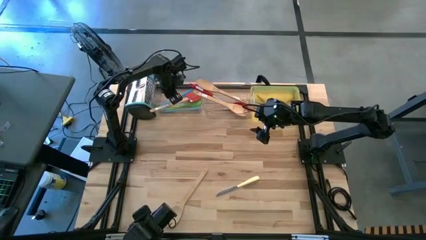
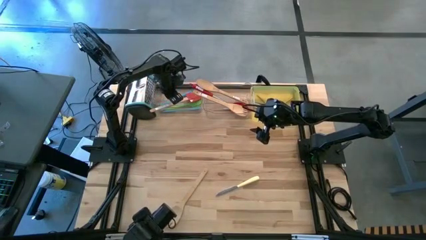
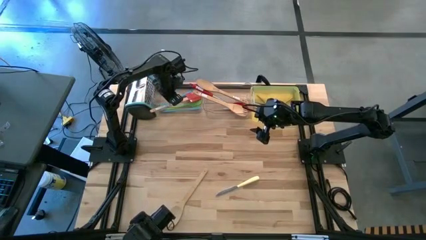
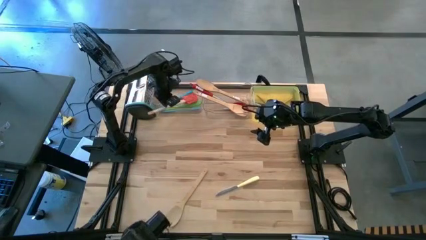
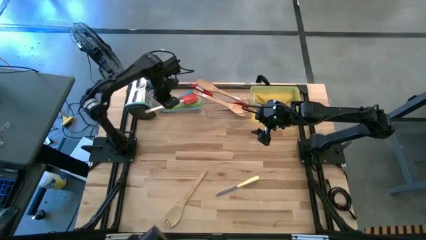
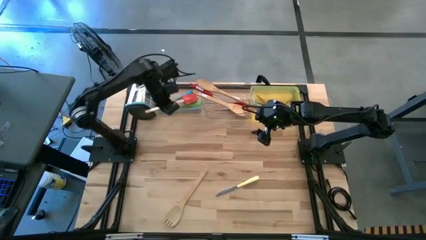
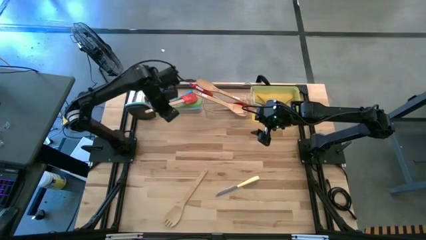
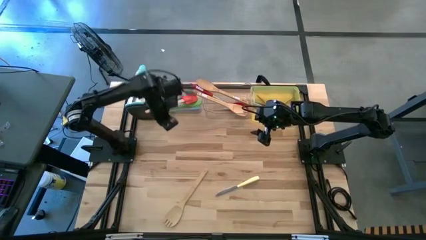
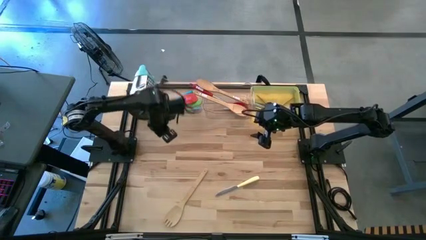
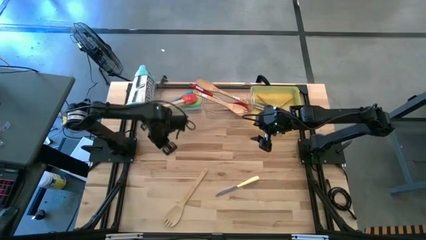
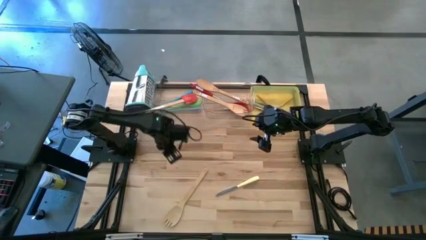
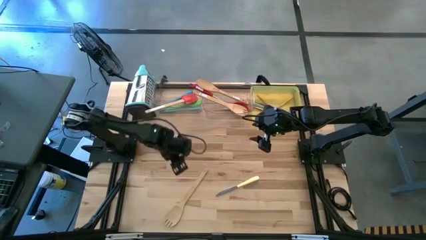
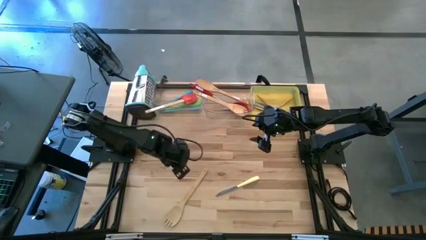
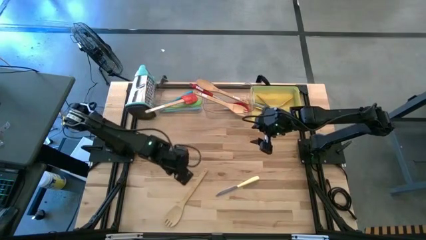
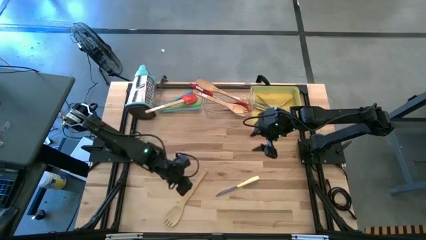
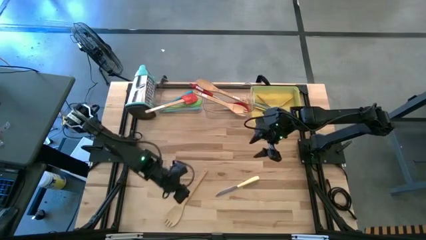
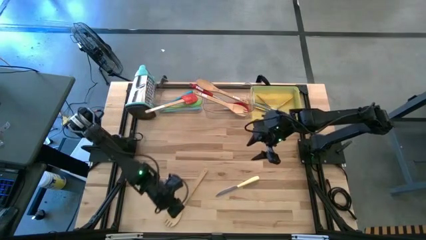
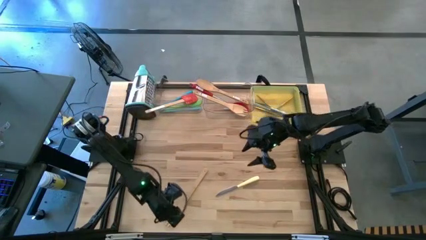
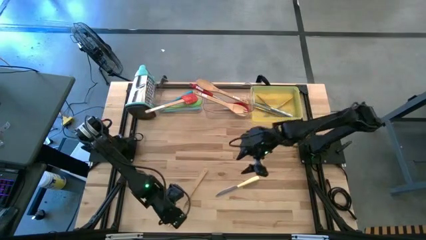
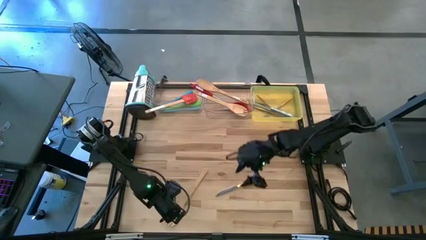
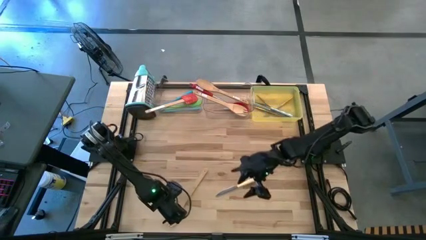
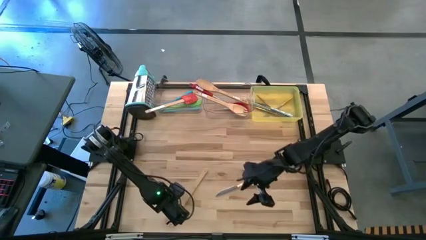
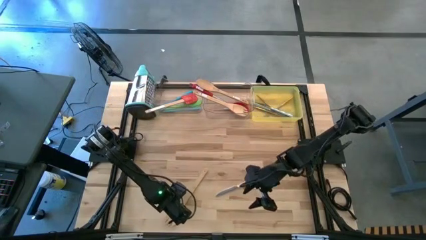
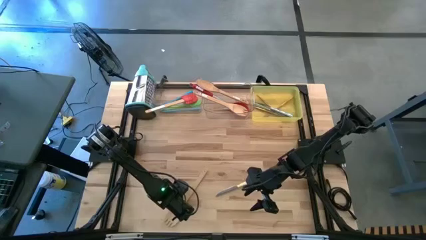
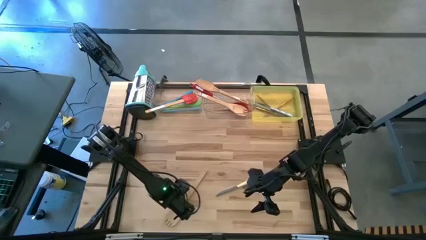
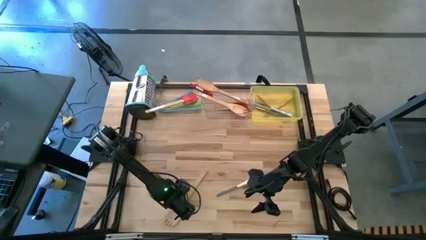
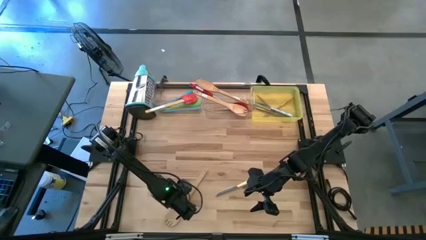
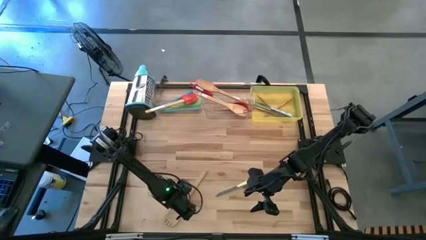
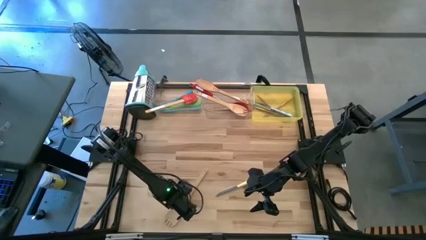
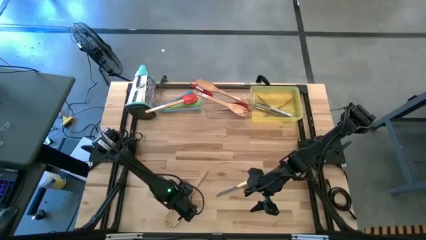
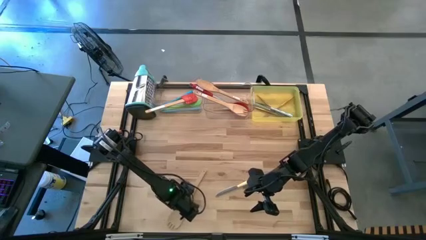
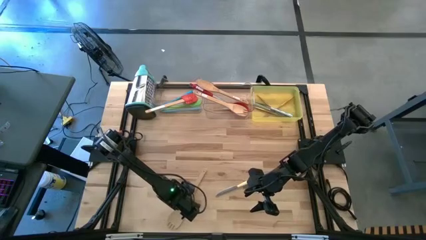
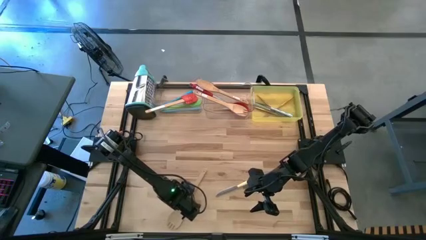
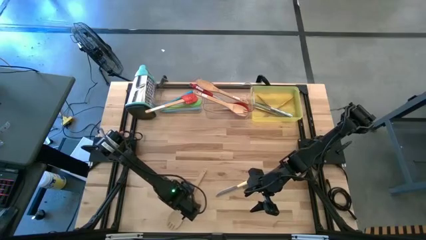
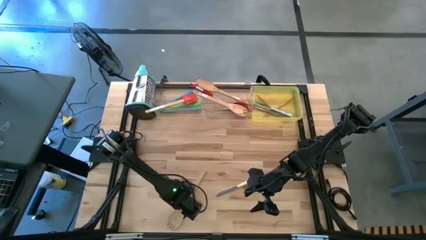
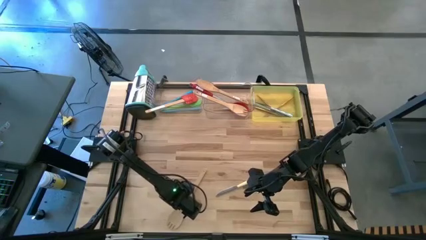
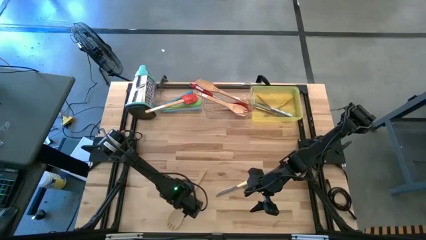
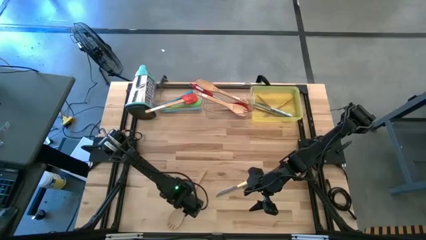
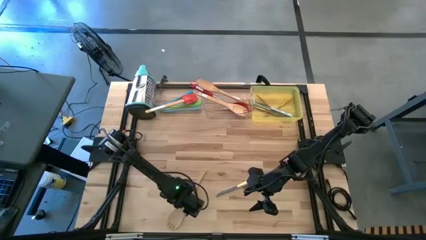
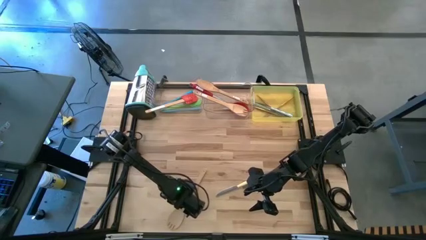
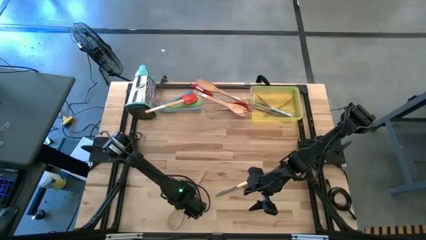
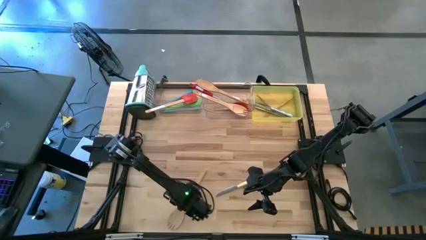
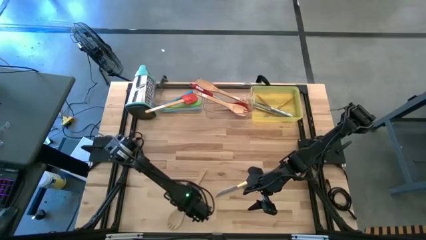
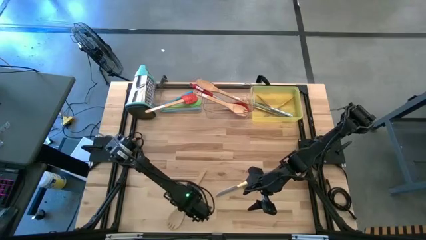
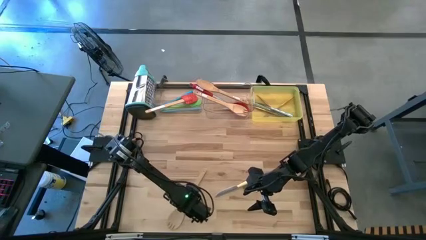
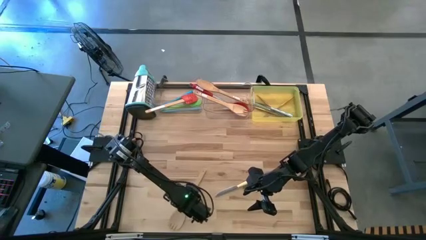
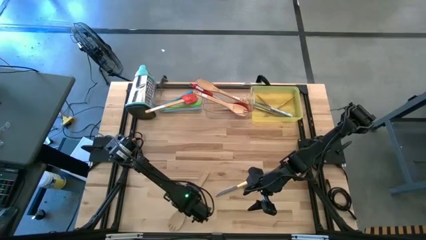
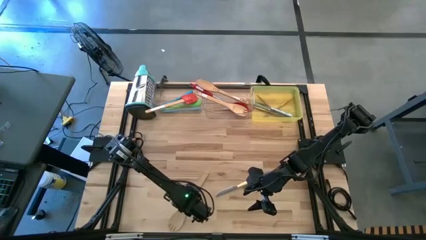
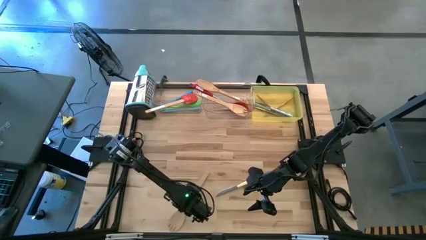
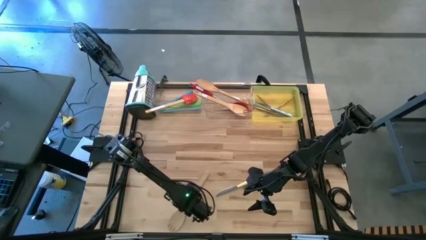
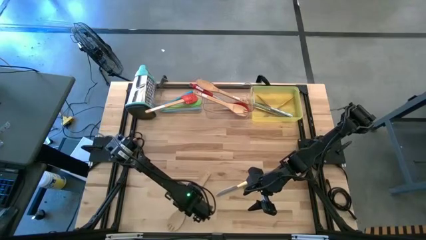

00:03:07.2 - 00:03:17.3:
Task: Pick & Place Kitchen Items
Put the brown serving spork into the right transparent bin

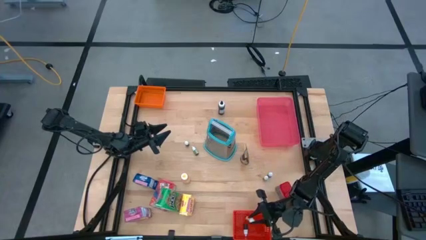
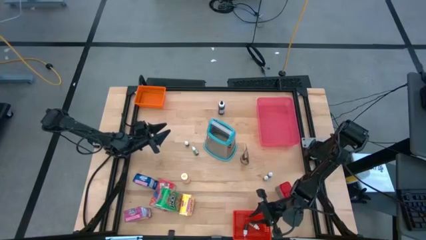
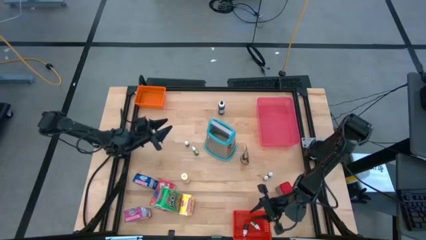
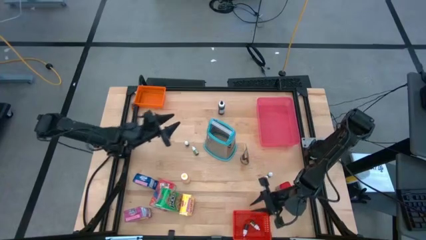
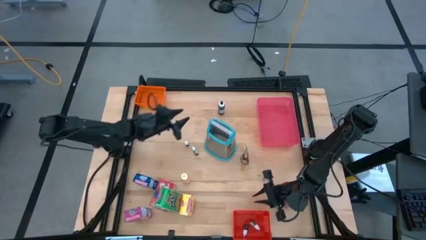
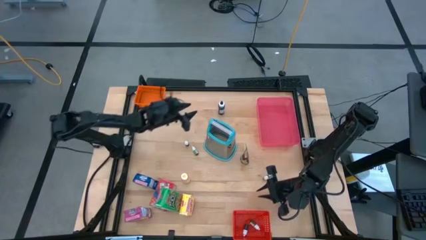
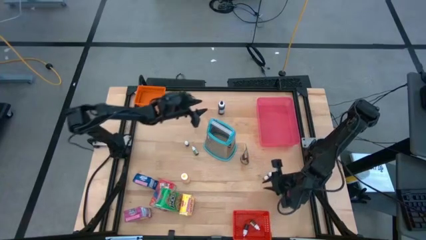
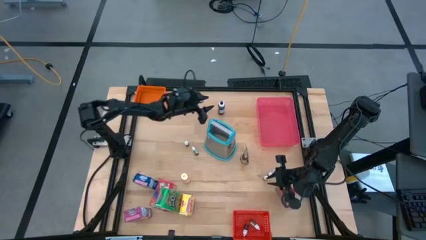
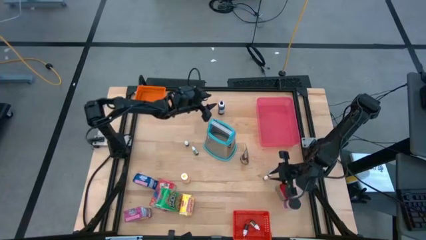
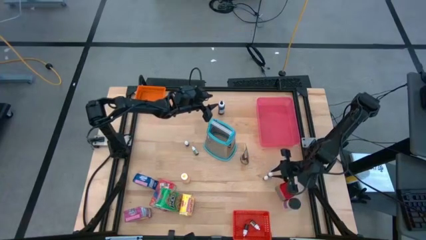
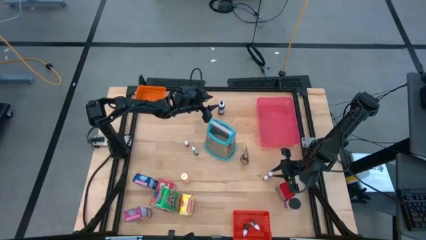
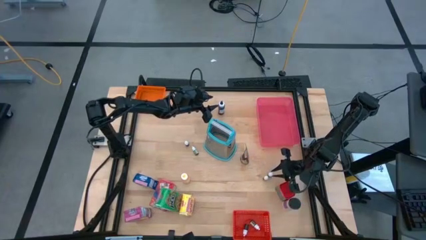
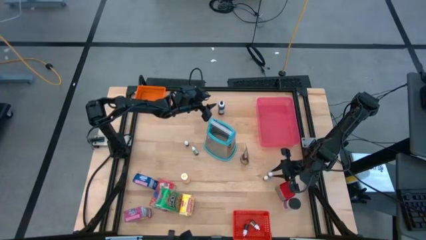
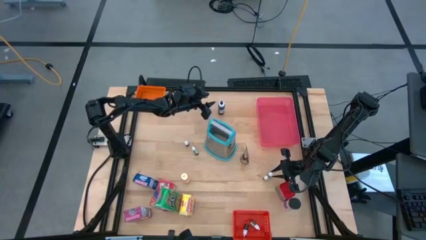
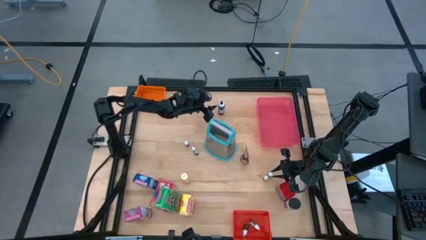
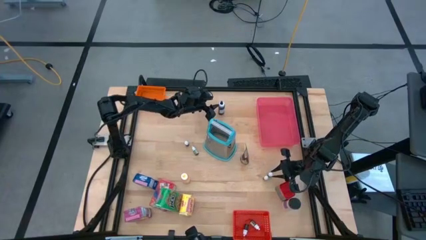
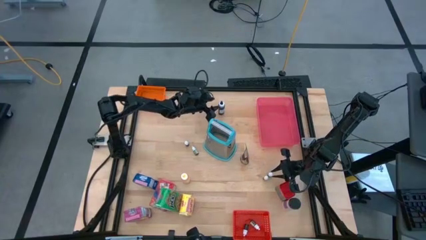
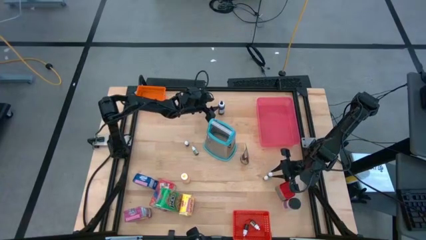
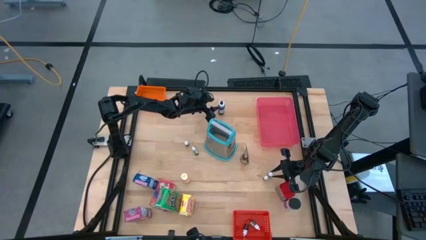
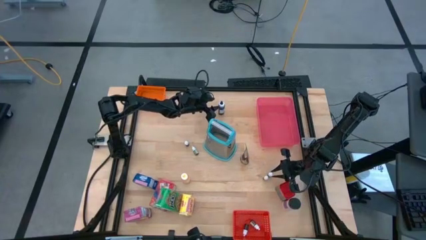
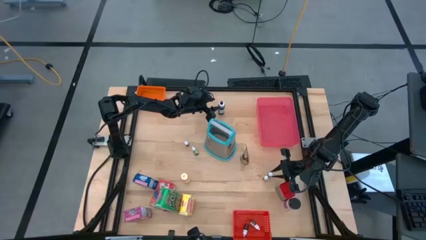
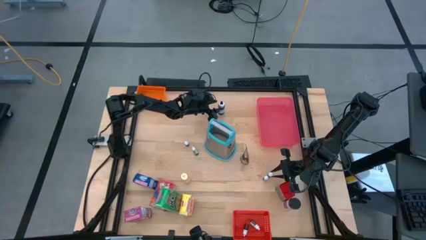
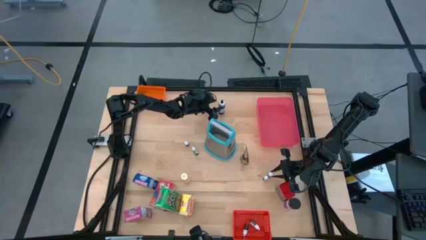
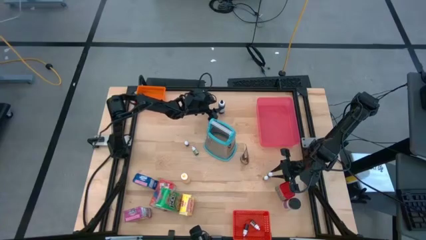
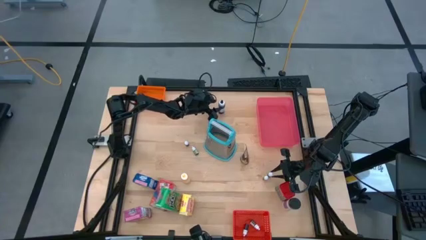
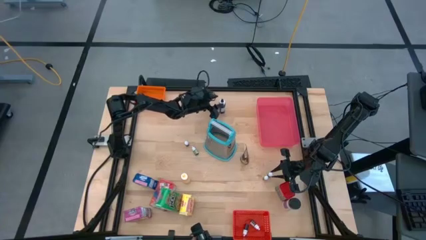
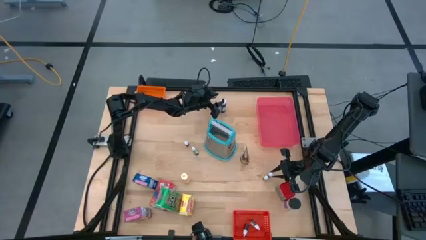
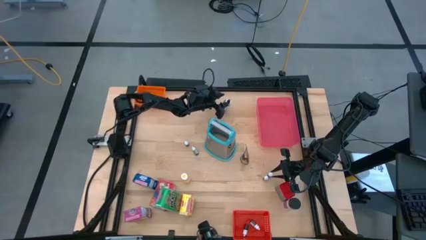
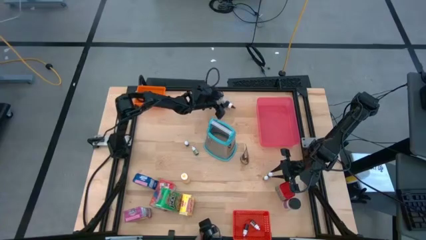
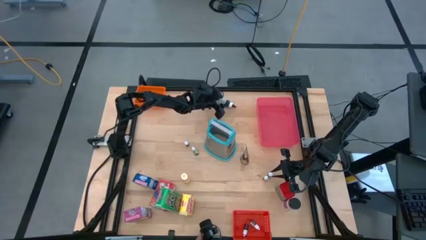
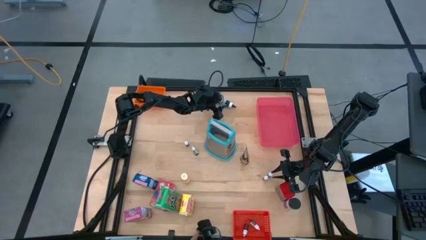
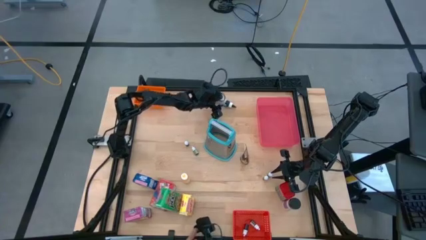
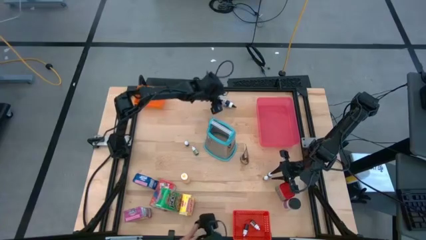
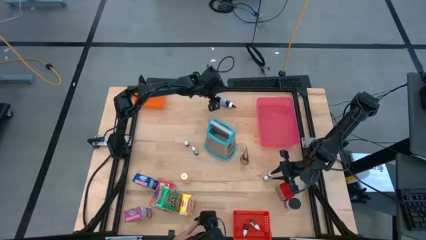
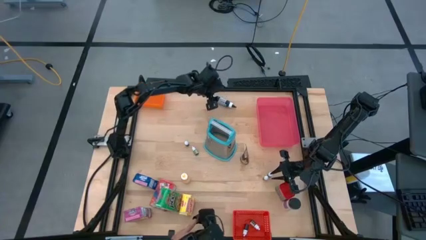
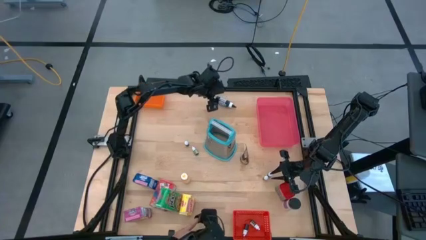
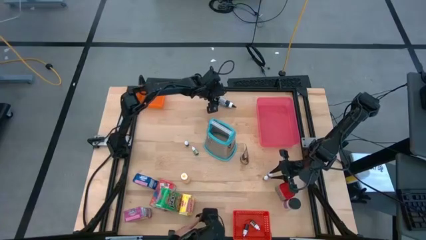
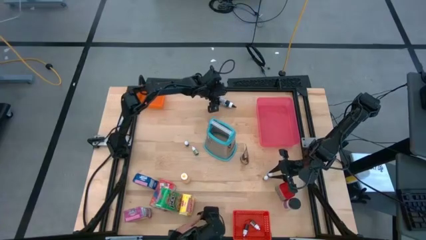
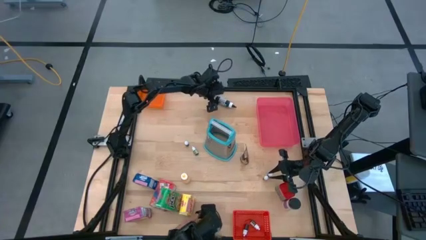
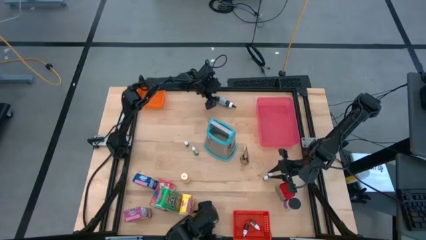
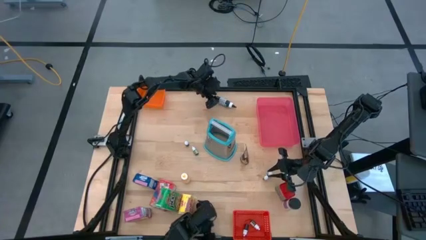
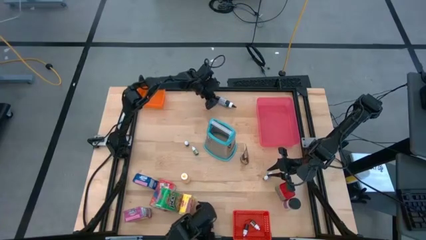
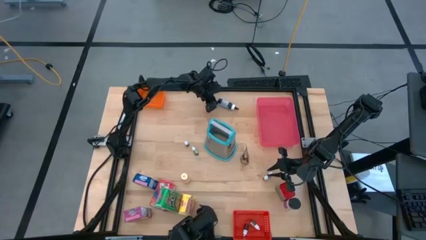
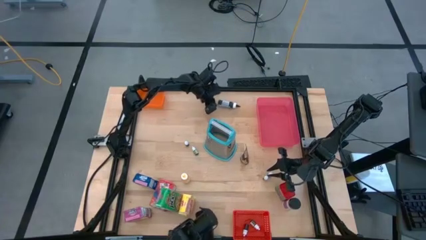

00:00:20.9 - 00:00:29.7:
Task: Pick & Place Kitchen Items
Put the big black food coloring bottle into the red bin
